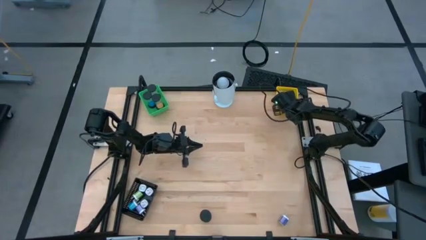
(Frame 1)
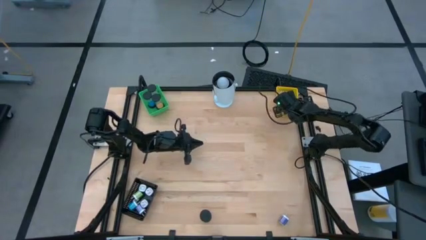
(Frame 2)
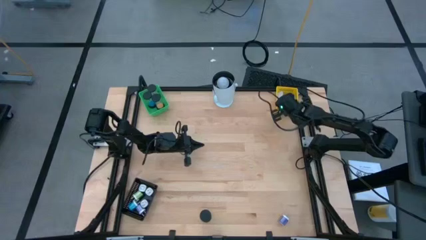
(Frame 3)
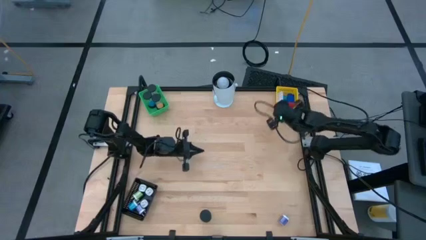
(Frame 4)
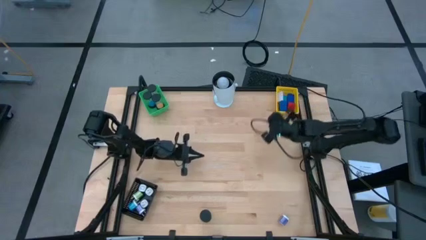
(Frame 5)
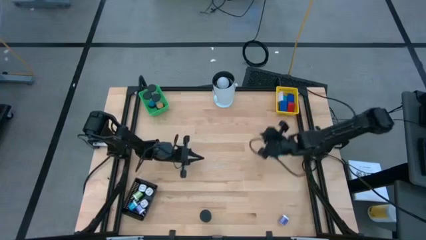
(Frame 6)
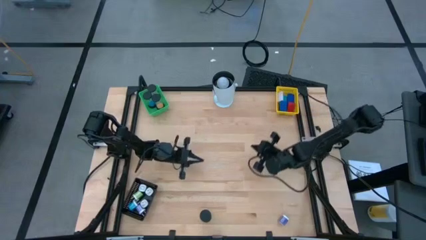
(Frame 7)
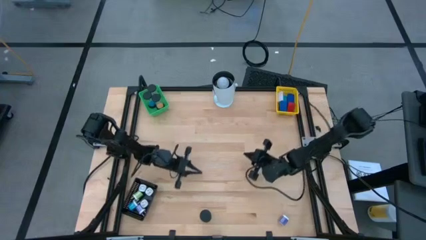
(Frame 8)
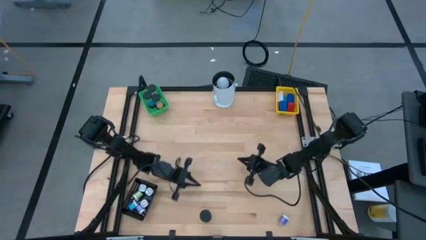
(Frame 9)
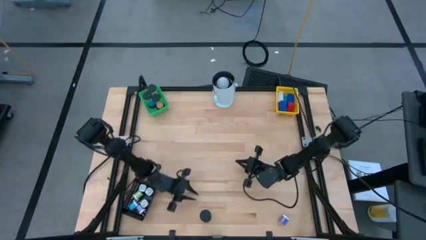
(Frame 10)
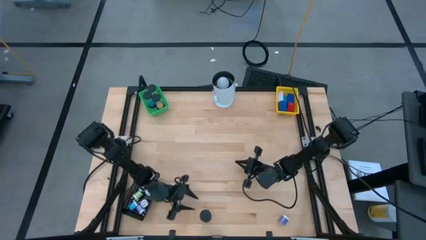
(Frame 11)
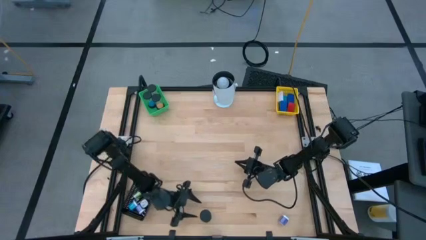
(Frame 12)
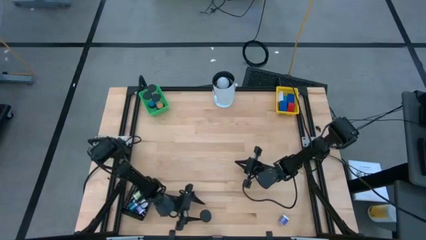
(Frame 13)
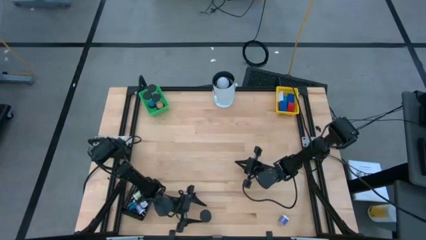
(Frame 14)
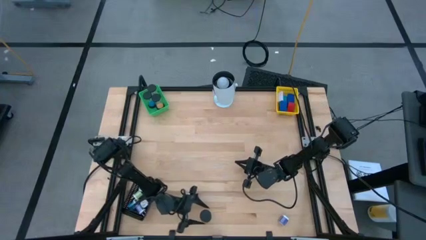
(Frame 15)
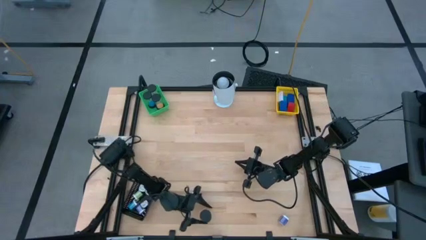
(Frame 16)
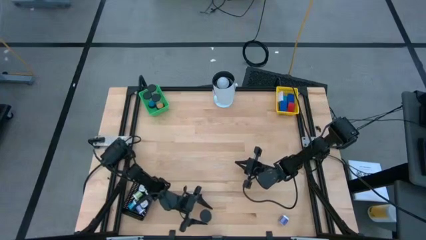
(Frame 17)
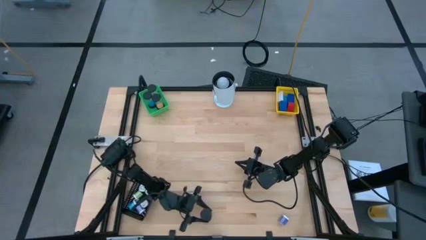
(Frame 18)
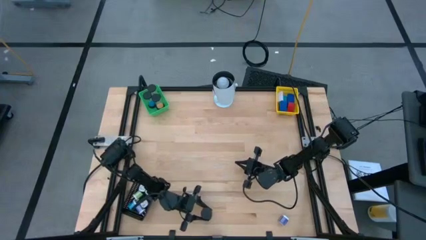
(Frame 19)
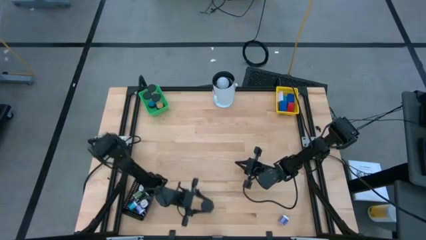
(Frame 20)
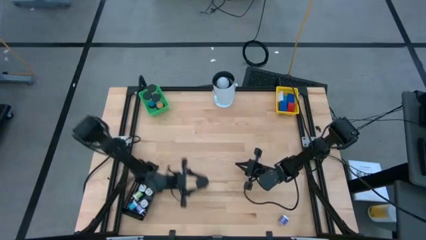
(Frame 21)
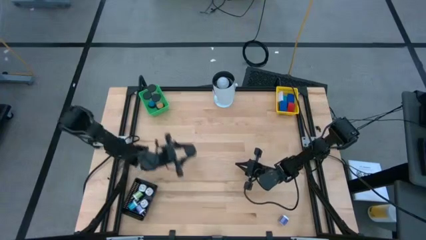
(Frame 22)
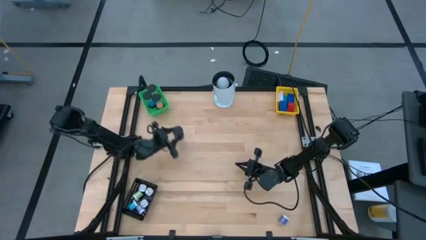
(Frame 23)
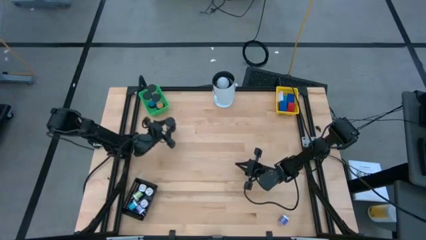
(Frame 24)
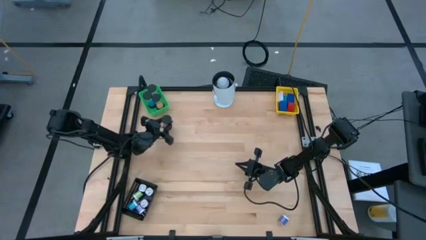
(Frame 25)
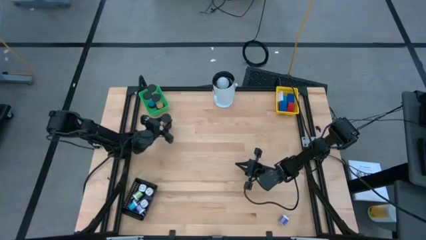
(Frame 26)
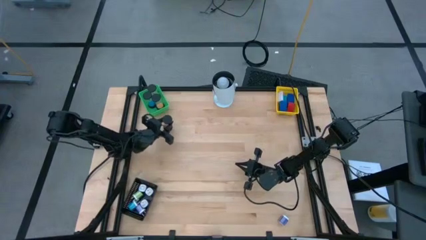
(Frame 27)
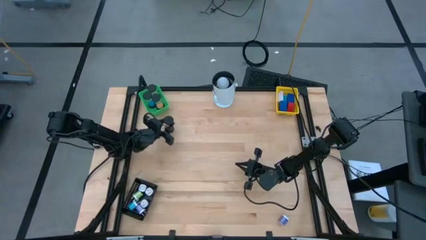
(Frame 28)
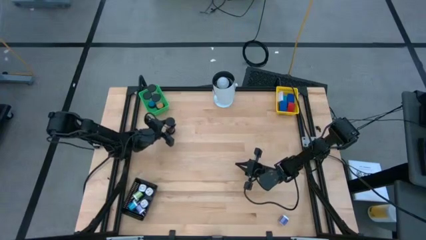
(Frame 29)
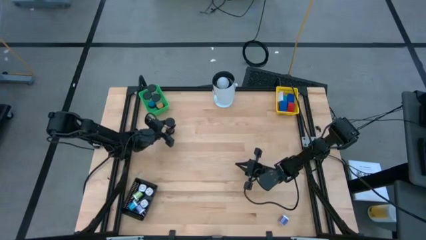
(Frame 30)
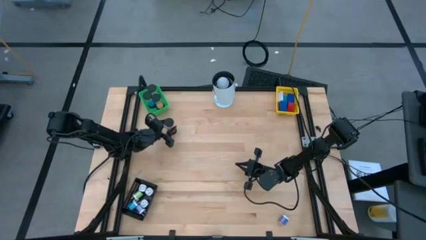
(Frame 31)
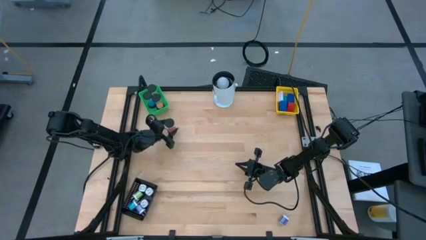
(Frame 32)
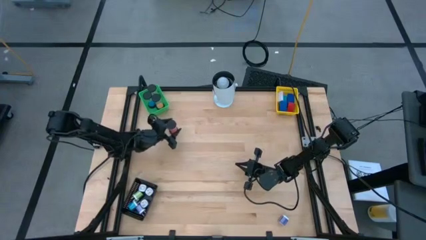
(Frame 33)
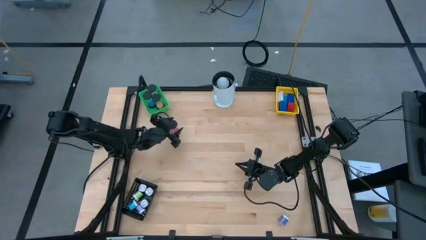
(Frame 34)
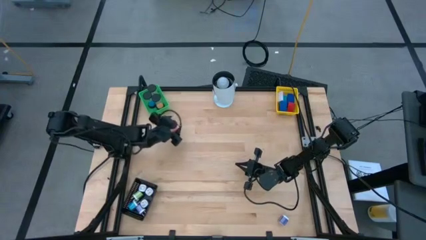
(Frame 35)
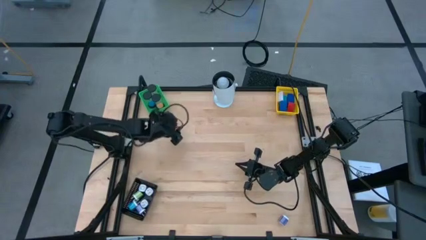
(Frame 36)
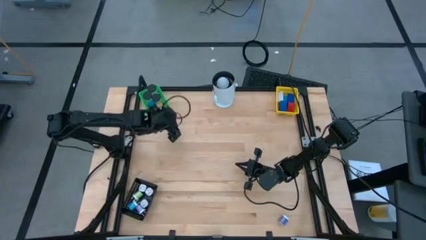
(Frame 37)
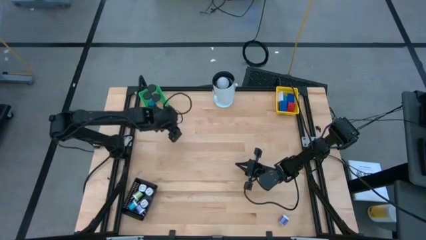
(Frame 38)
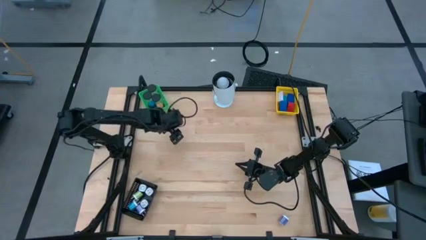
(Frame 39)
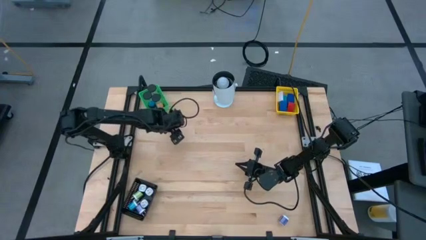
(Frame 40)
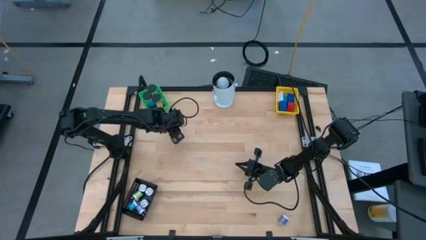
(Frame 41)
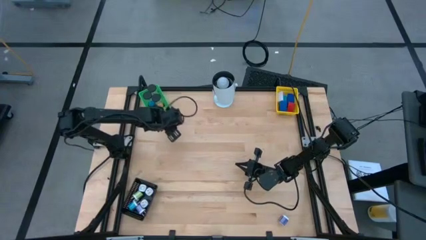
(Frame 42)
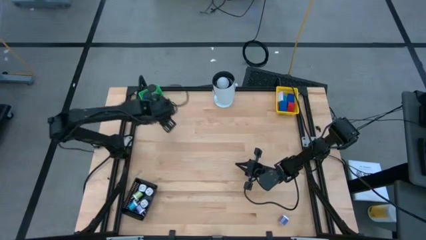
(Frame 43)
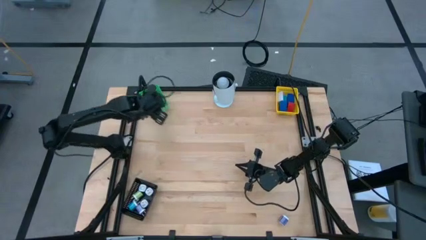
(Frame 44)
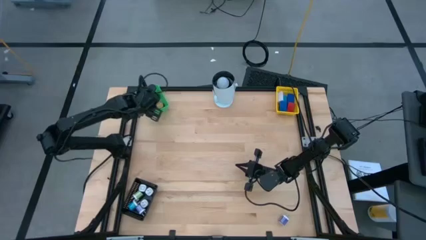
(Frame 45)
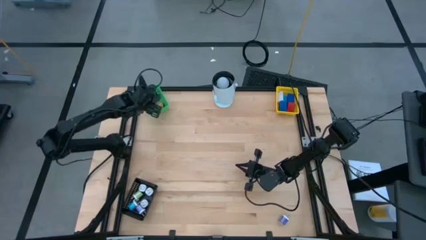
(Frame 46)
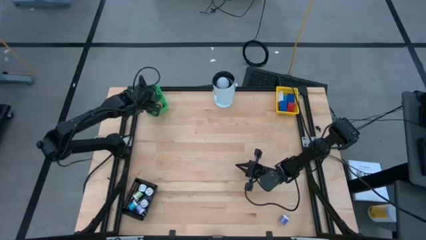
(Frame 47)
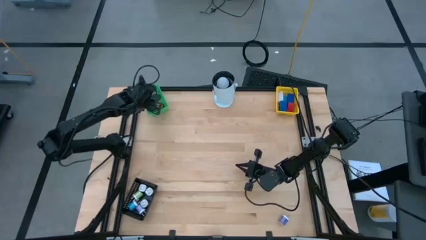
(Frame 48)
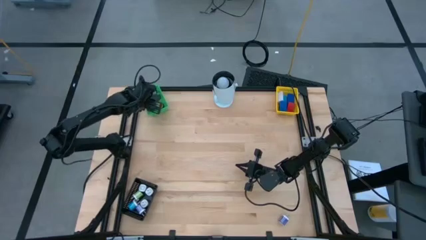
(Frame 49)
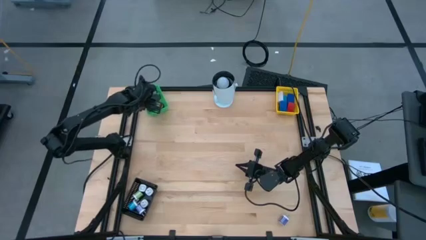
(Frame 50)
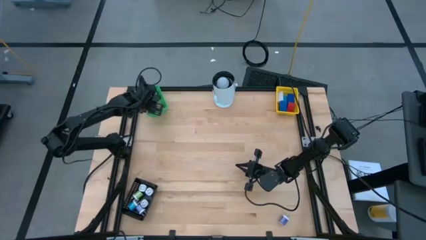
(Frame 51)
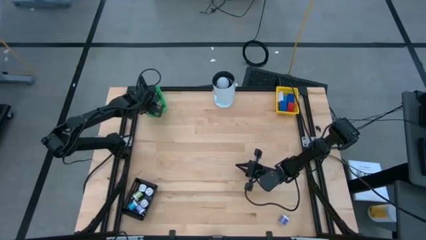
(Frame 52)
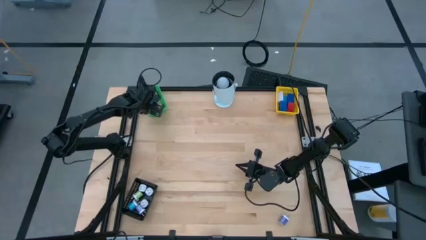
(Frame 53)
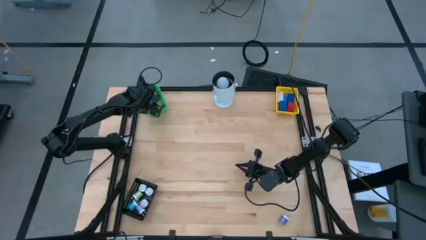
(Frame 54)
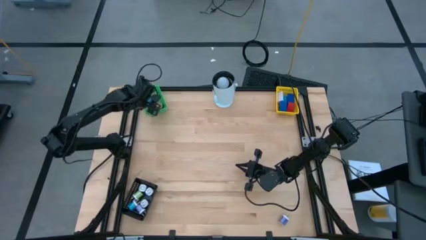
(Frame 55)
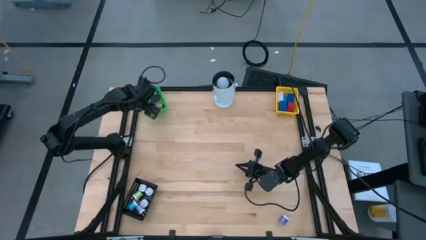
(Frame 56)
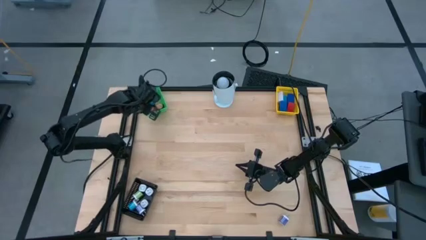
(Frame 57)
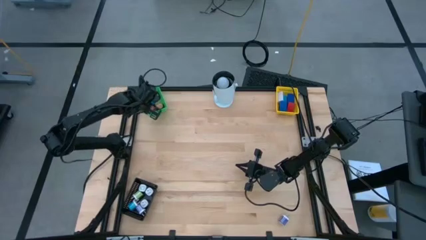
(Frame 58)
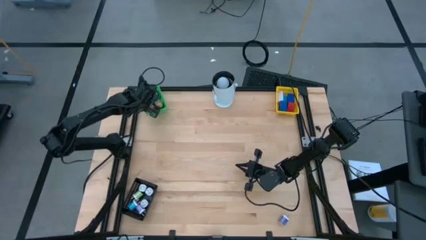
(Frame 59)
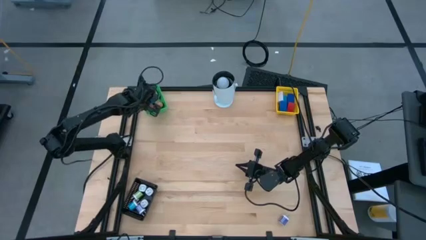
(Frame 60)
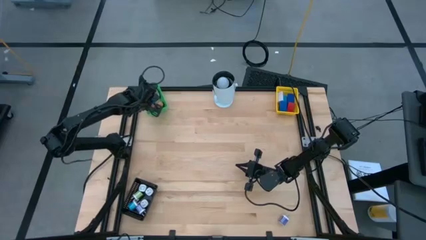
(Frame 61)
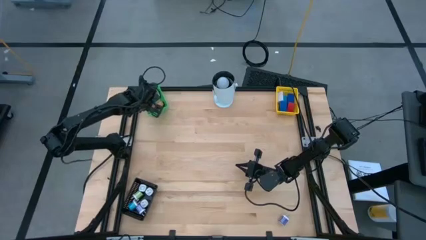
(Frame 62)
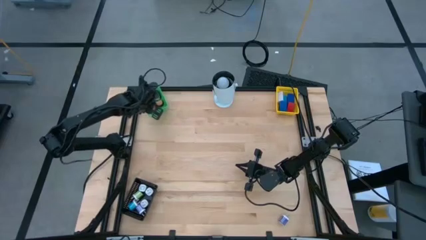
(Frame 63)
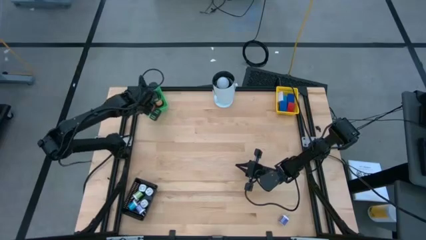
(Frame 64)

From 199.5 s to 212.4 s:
Task: Pick & Place Office items
Put the red hourglass into the green bin
